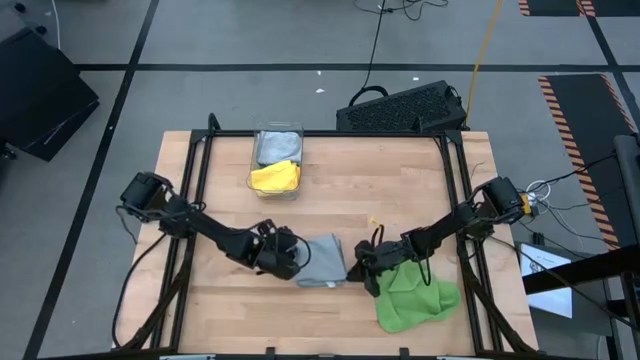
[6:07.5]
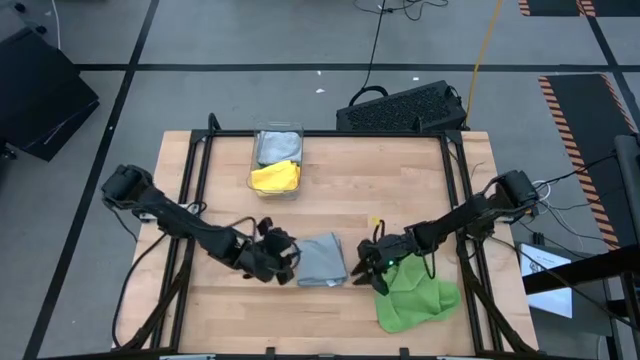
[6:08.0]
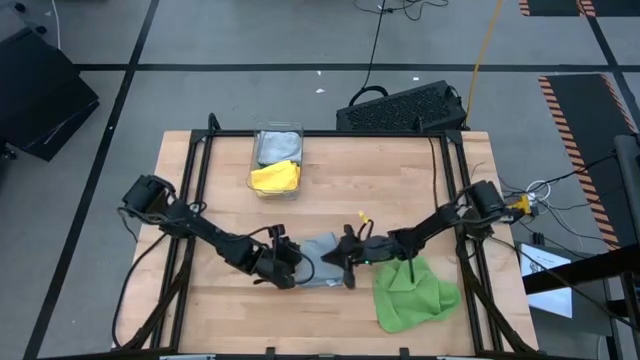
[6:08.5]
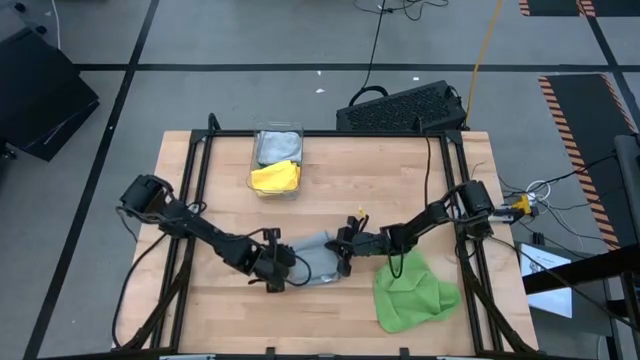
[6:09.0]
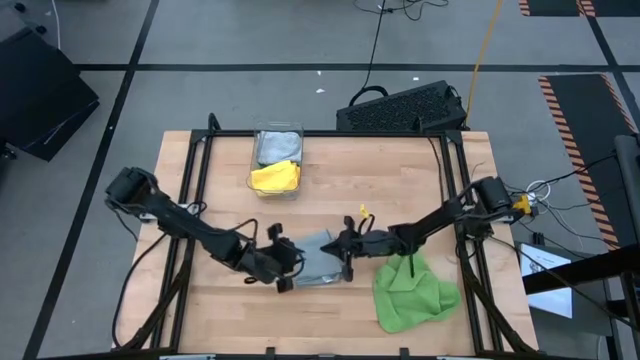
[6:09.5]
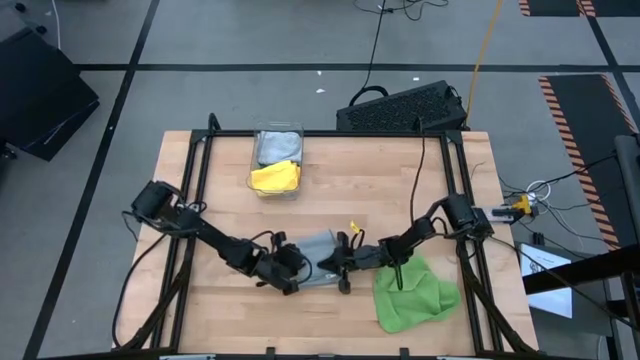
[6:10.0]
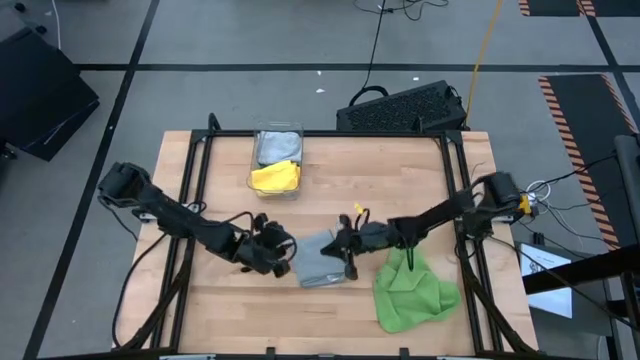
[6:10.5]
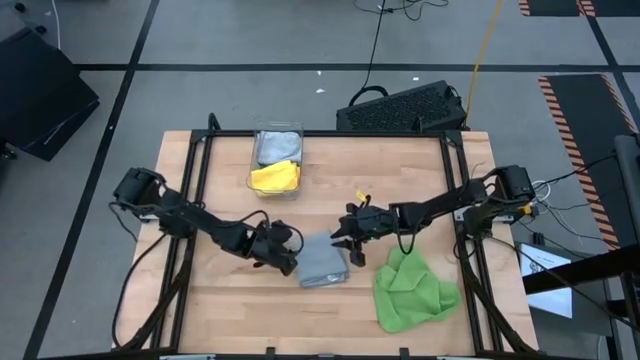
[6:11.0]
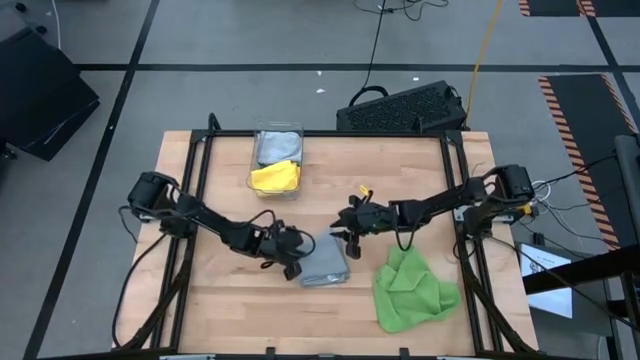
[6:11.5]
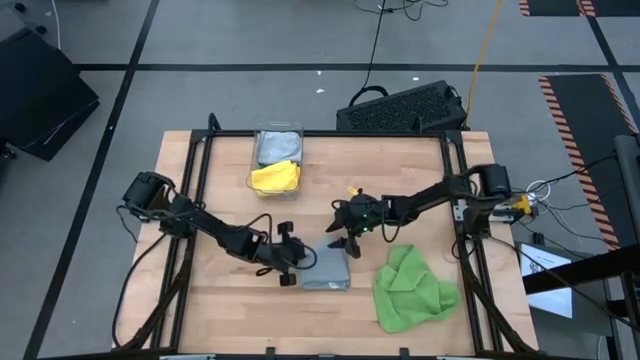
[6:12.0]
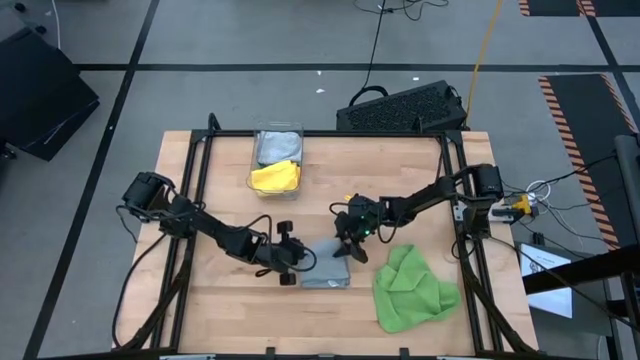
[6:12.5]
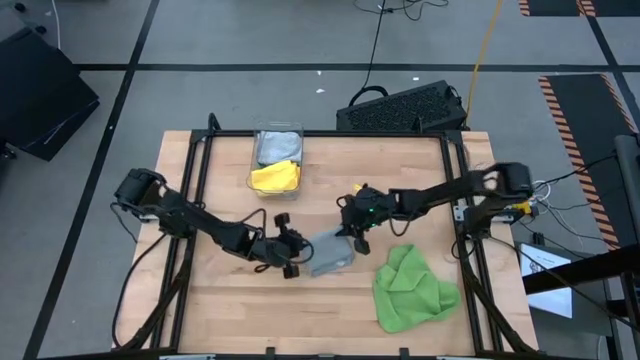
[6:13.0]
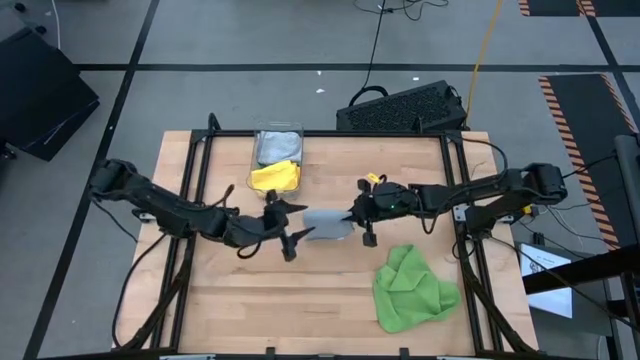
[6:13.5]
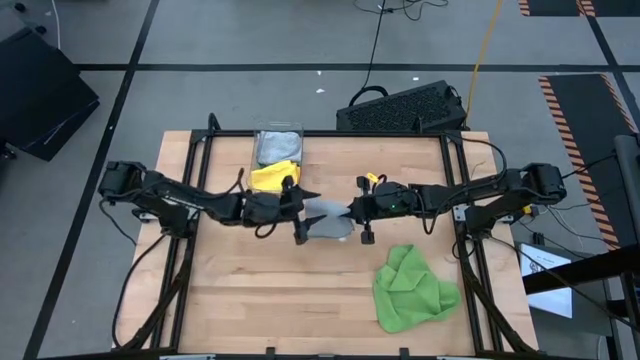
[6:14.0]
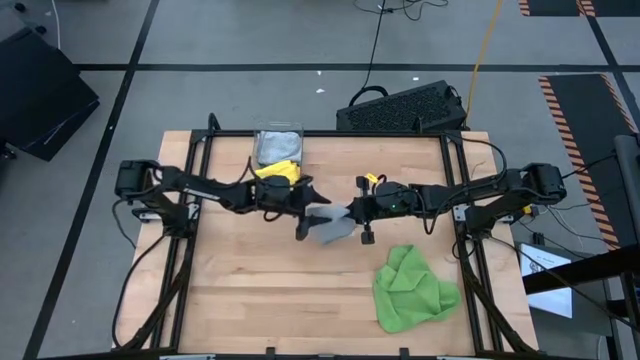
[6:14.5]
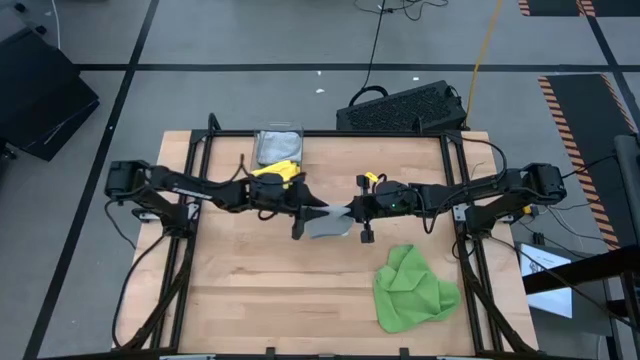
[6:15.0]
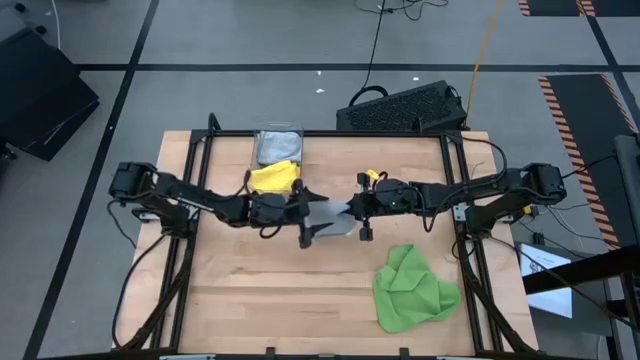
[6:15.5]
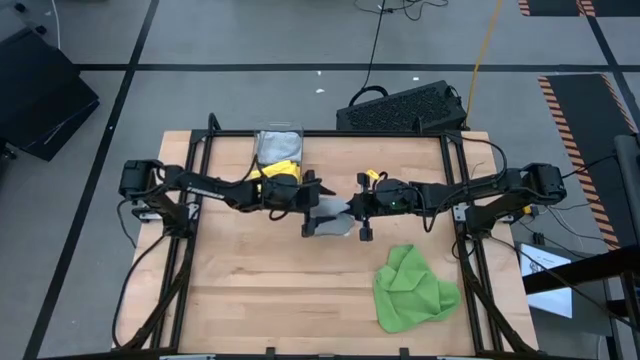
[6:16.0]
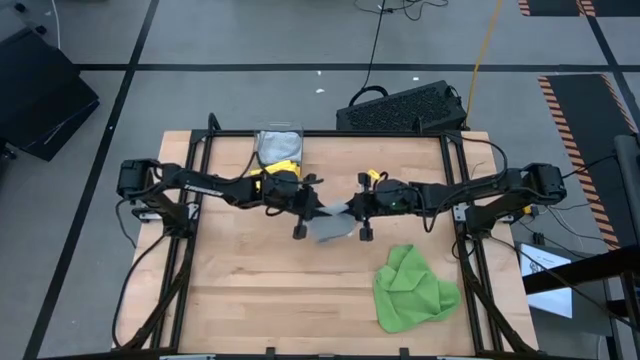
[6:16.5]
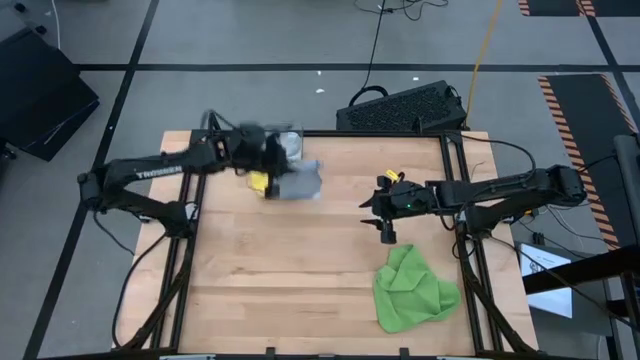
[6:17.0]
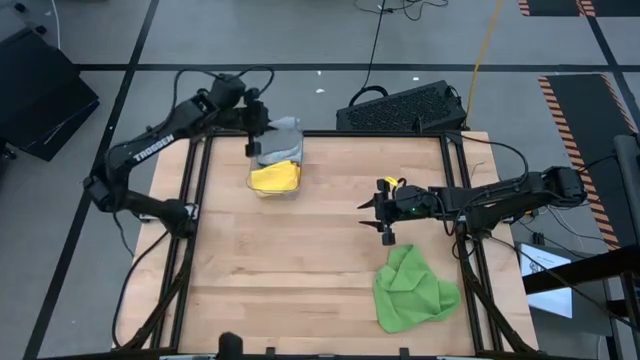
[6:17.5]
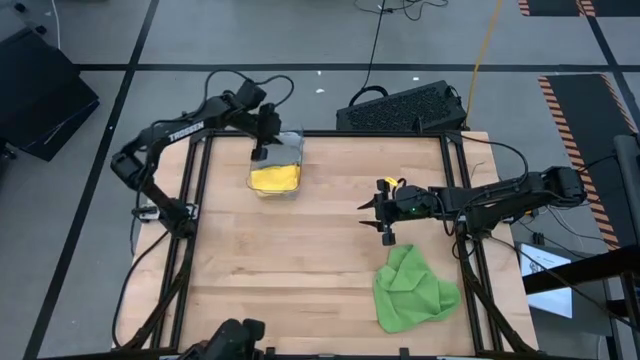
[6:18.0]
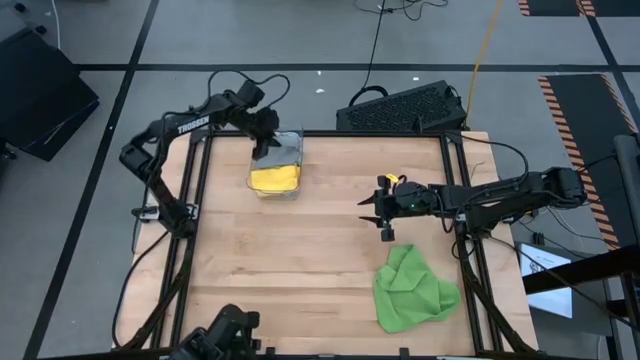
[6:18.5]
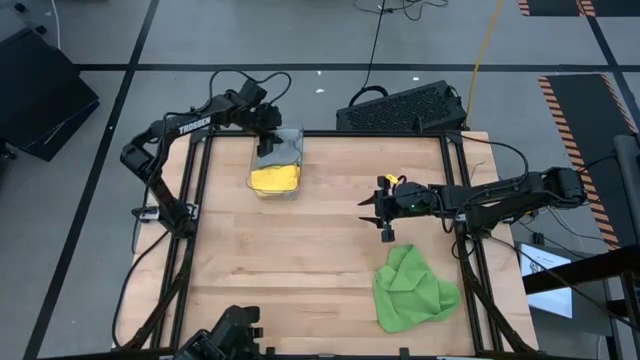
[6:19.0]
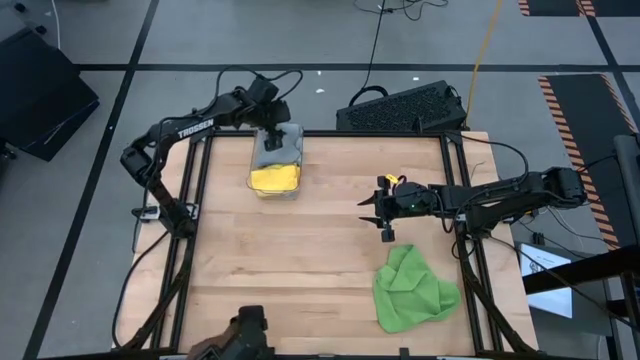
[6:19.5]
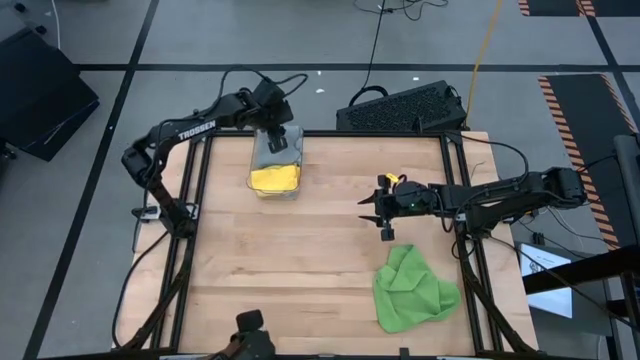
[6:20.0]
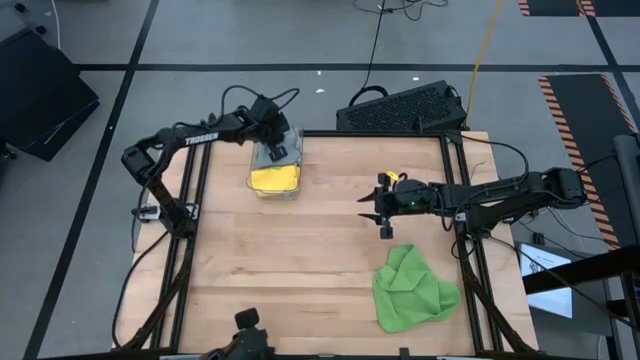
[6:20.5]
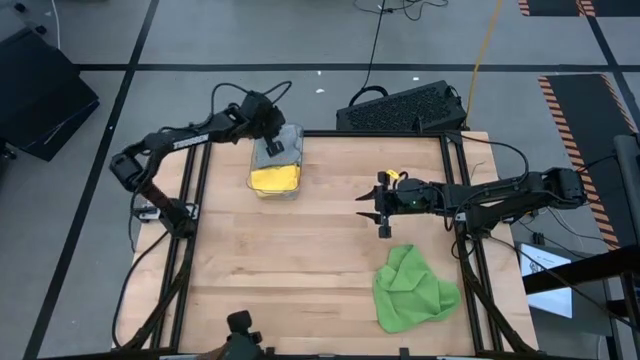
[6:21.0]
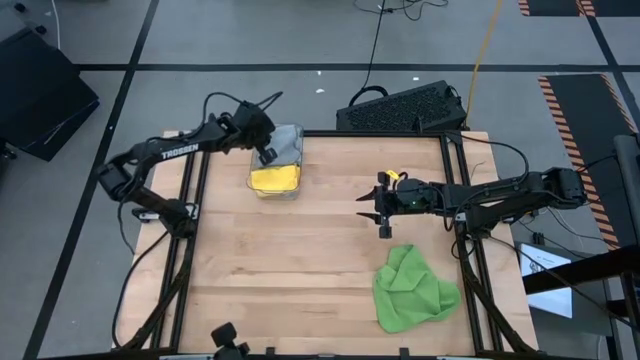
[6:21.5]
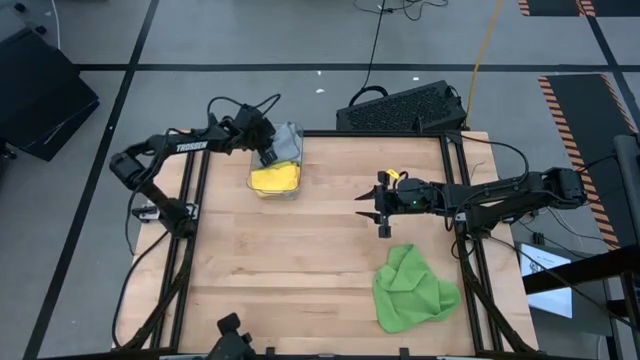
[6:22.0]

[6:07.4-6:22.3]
Task: Fold microfiber towels
Put the gray towel into the transparent bin

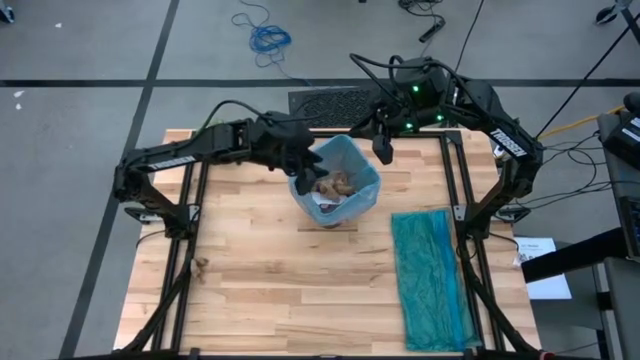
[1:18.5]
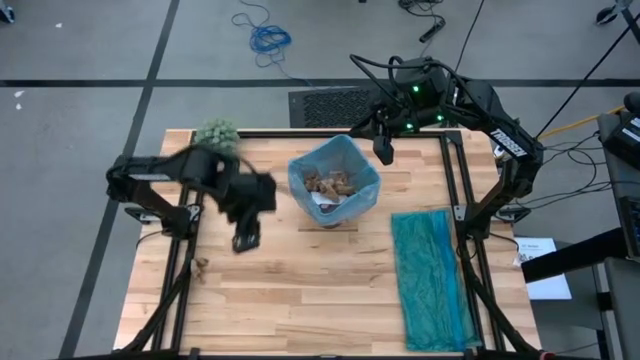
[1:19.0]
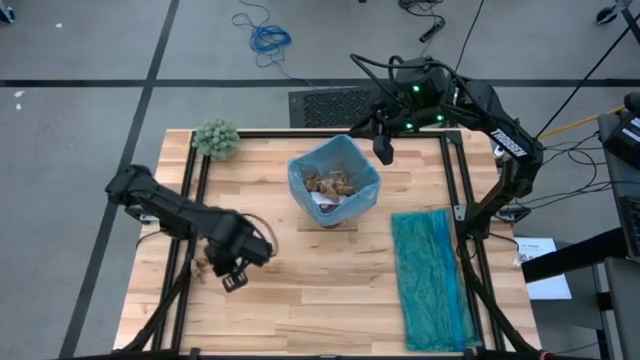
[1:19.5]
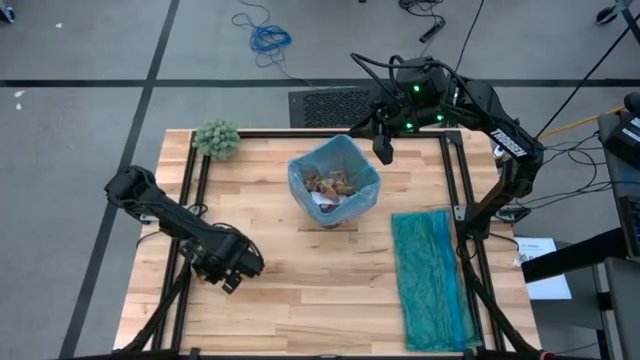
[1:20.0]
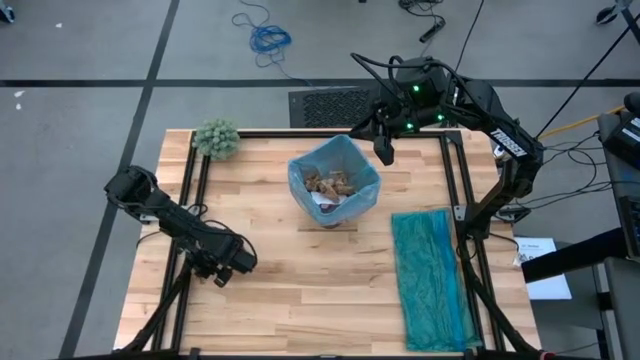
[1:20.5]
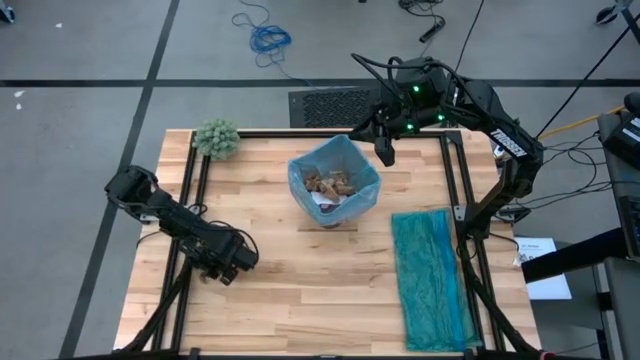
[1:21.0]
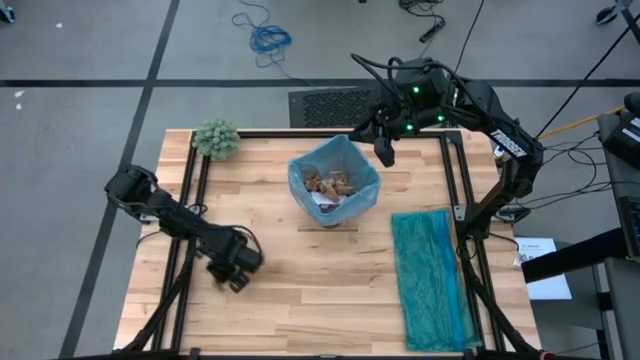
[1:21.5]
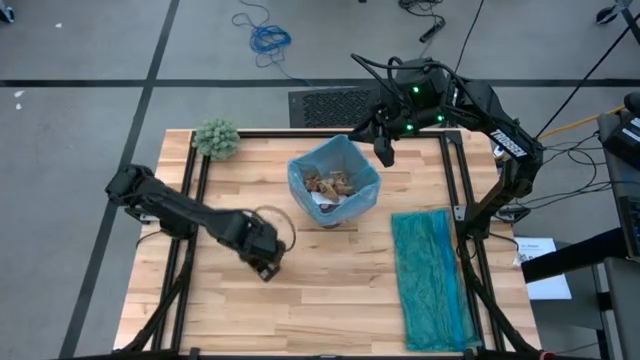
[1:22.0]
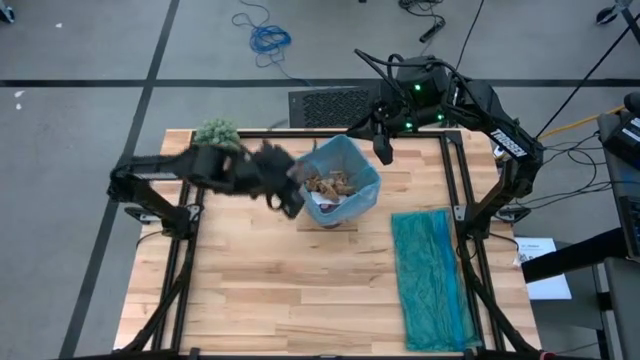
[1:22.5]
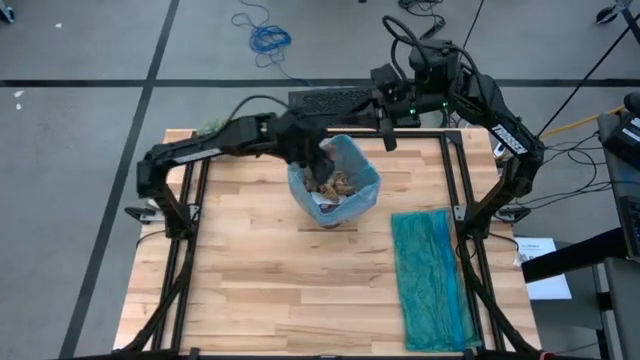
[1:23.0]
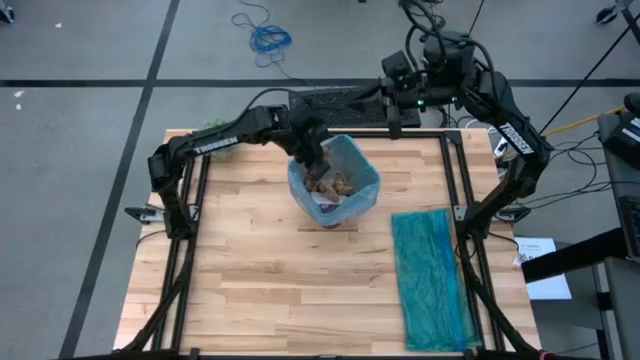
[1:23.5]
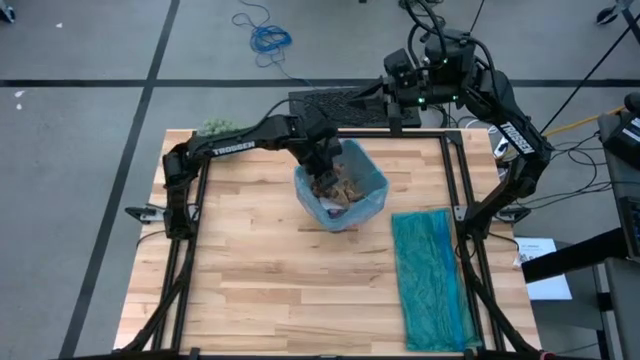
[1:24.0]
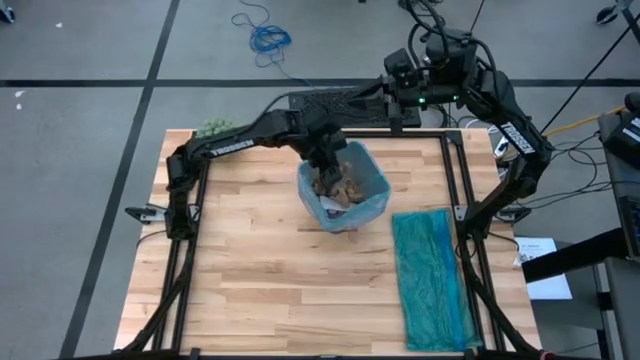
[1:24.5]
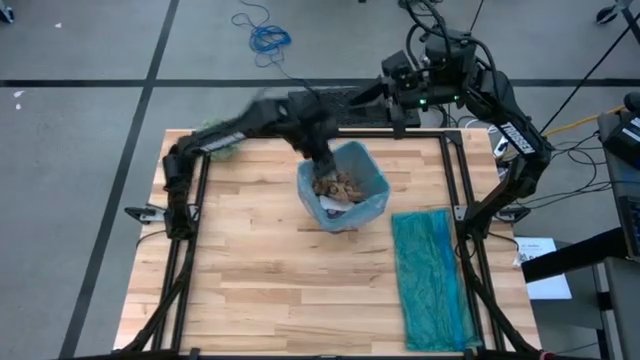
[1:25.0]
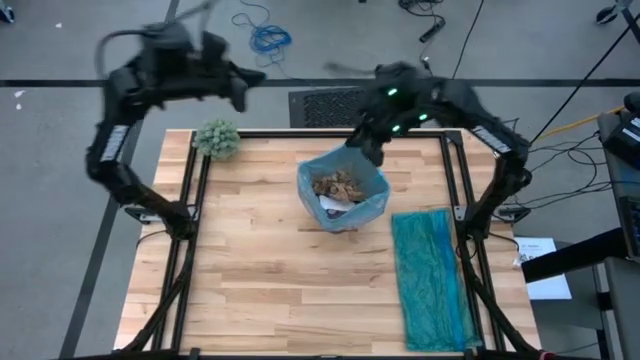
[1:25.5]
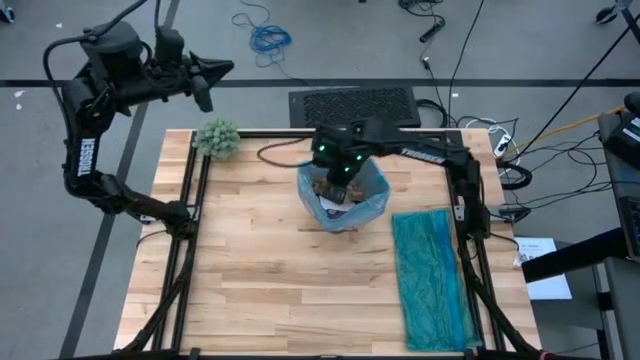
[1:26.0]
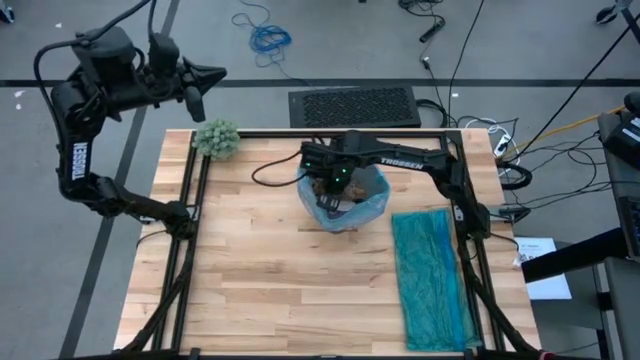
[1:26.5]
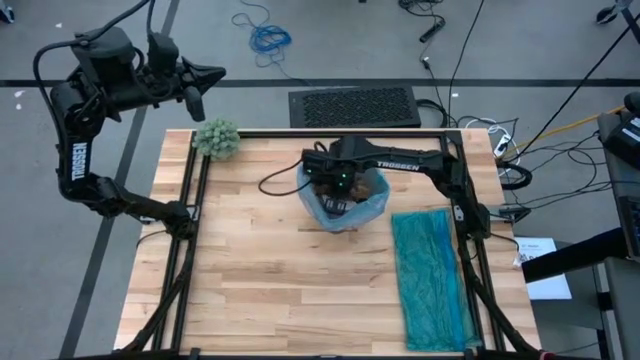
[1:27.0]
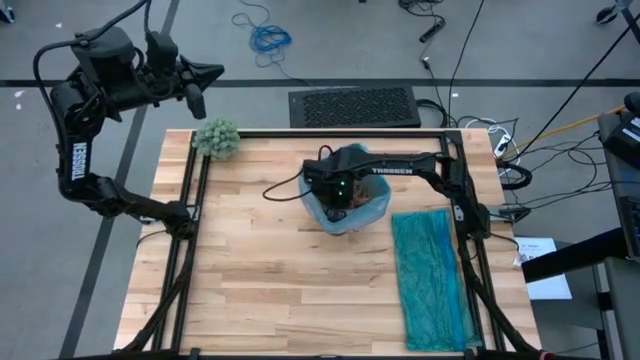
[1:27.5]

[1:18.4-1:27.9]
Task: place trash/remove bag and relplace
Put the brown paper into the trash bin
